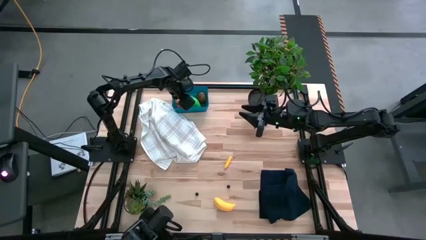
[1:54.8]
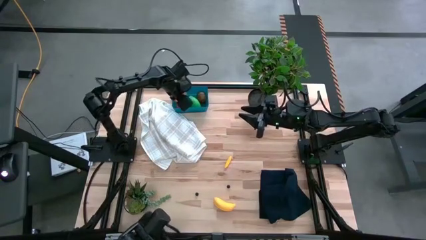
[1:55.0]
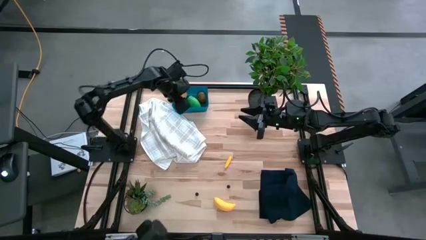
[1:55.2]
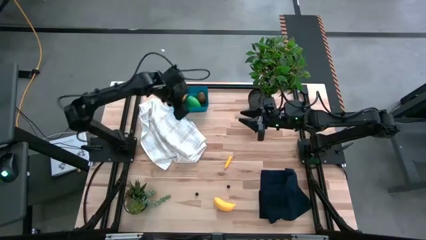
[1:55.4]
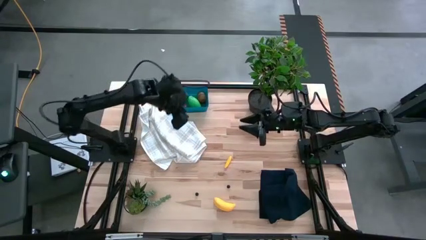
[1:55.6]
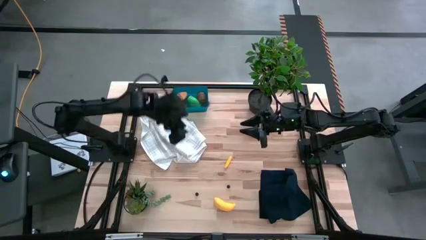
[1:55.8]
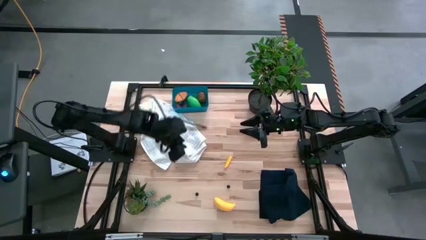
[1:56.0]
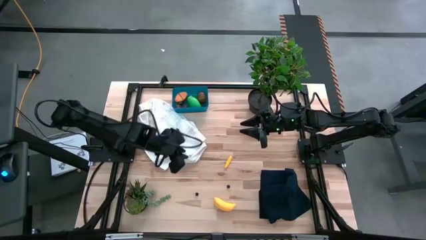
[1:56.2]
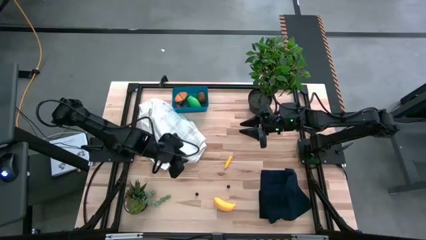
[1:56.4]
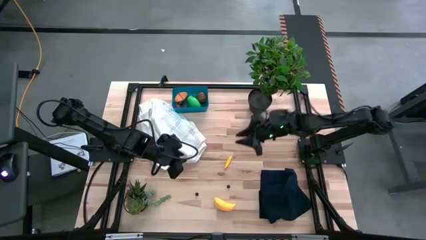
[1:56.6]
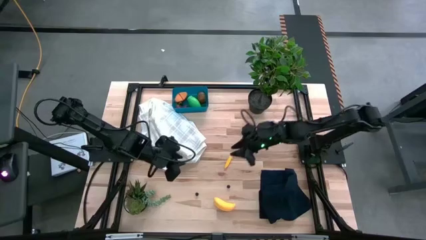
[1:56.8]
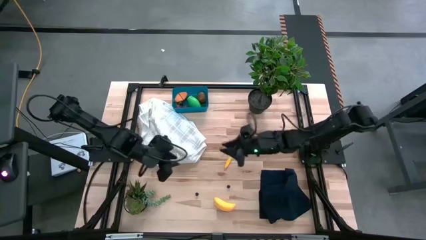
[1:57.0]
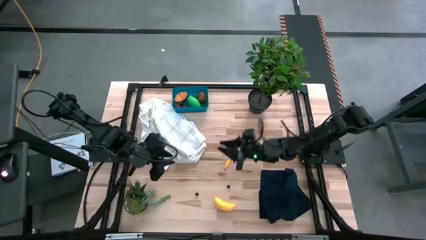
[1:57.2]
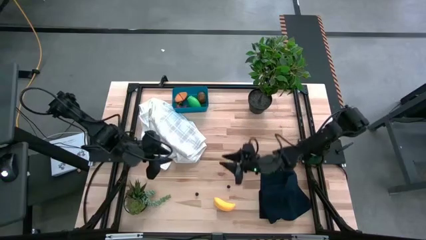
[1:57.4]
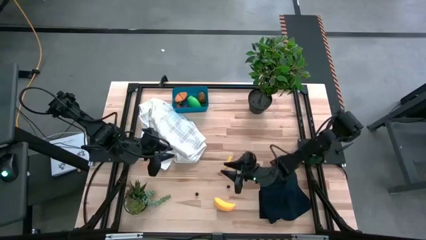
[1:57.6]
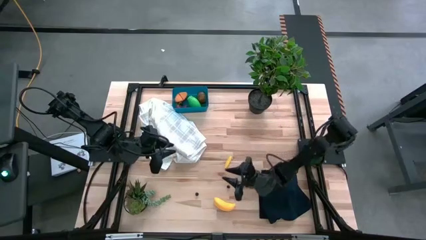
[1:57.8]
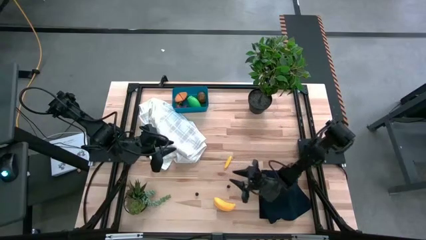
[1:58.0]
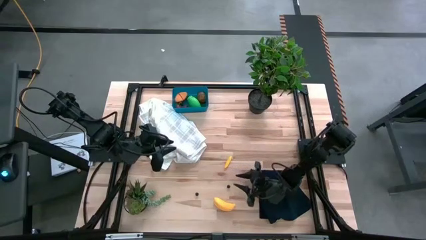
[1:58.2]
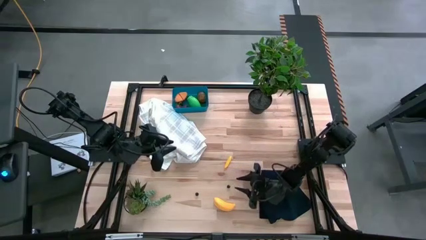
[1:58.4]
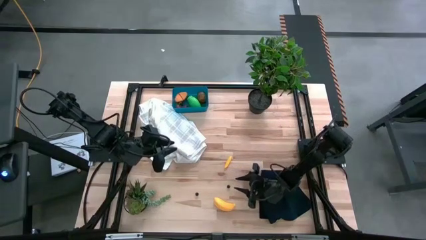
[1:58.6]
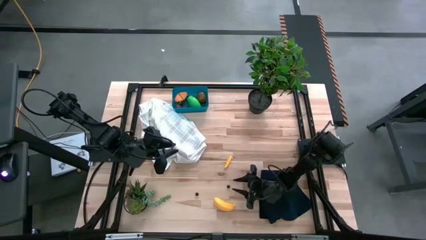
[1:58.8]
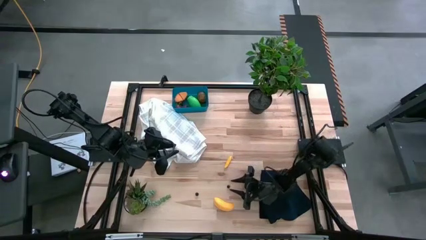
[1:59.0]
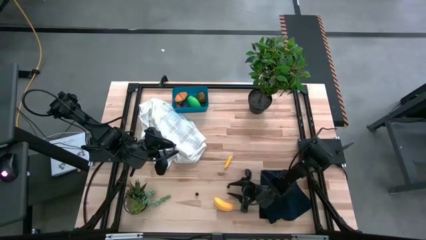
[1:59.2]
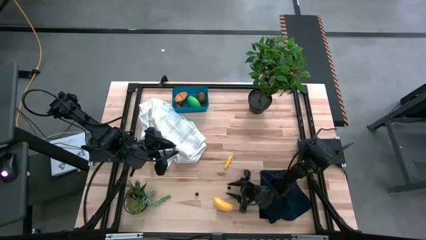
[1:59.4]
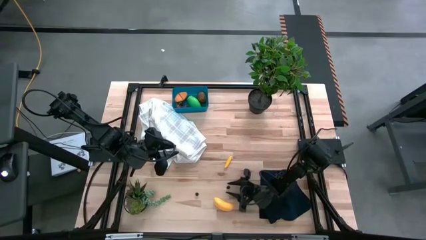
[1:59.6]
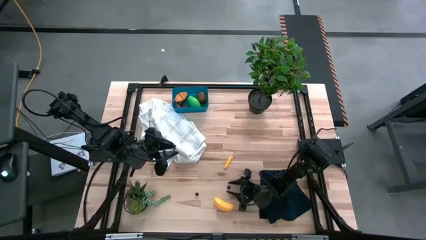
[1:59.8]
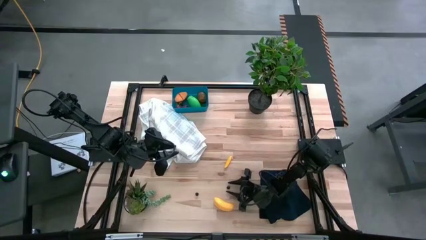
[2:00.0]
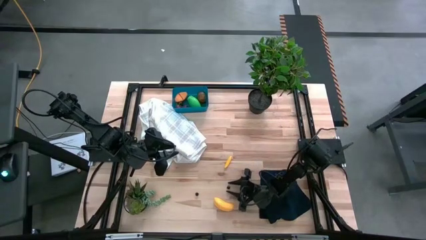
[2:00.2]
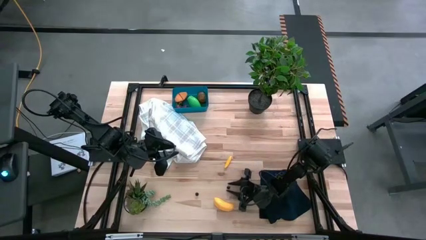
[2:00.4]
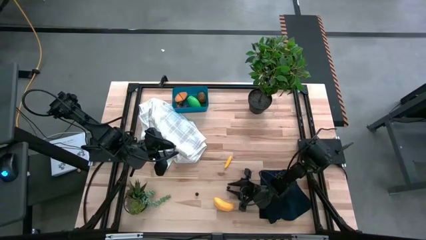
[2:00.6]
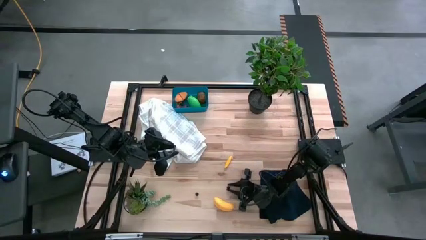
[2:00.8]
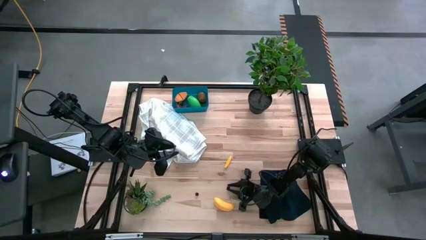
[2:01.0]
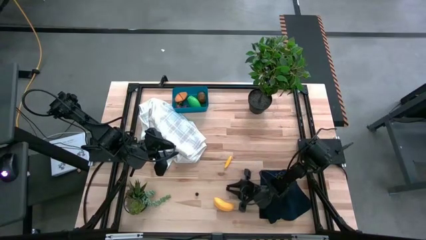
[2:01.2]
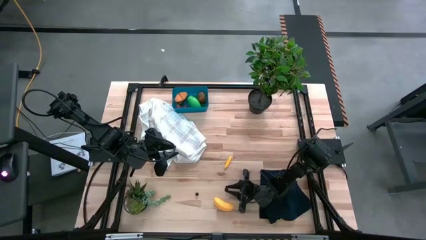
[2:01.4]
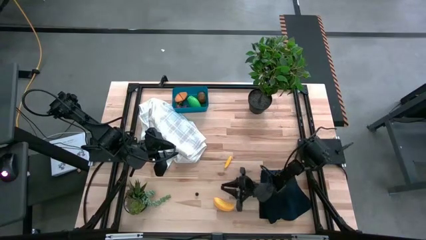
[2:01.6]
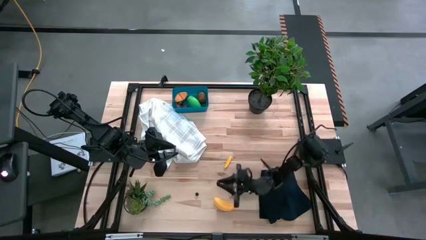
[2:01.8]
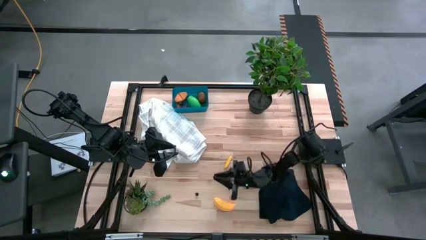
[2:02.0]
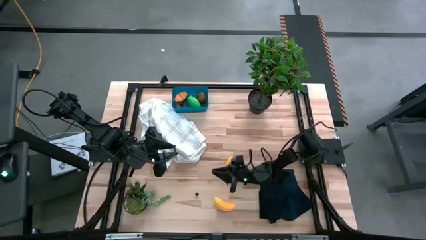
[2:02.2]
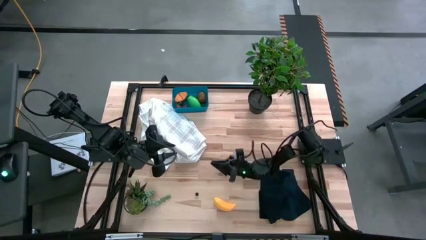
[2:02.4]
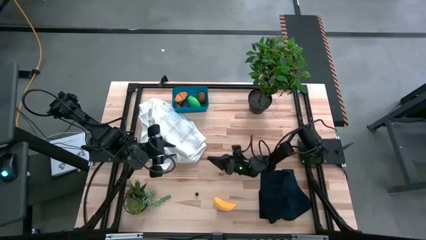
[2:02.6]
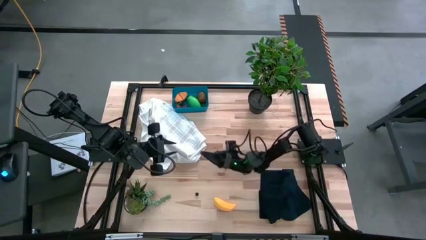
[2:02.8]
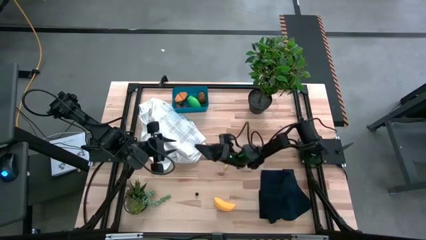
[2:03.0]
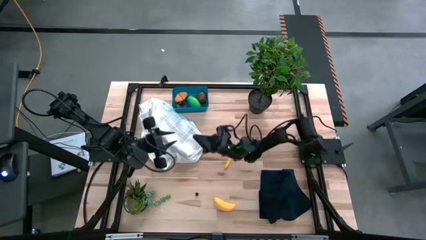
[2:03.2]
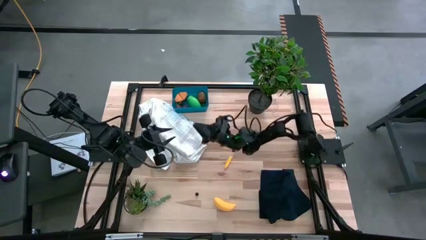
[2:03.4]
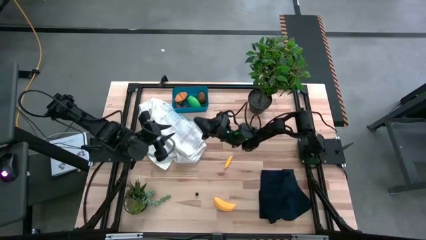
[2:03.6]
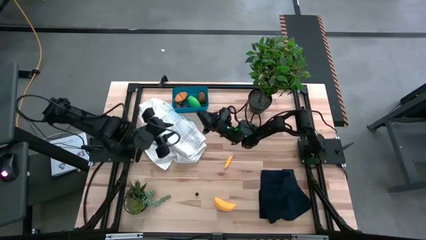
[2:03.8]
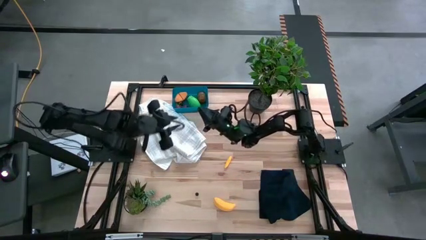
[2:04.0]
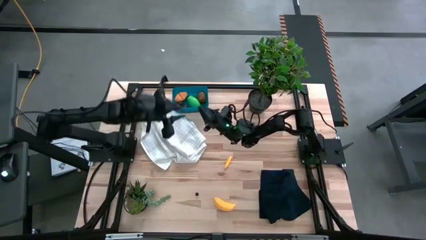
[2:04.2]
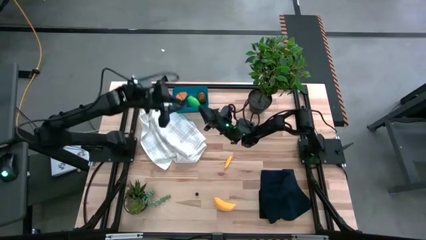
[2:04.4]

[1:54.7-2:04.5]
Task: Pick and placing Produce into tupperware
Put the blueberry into the blue bin

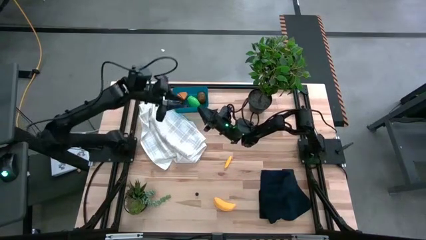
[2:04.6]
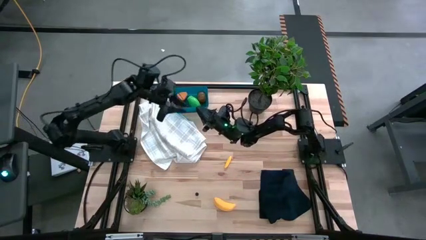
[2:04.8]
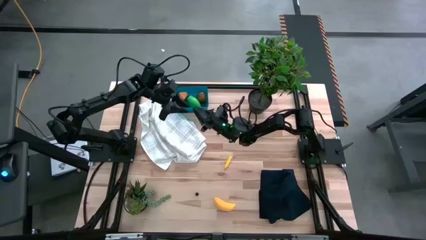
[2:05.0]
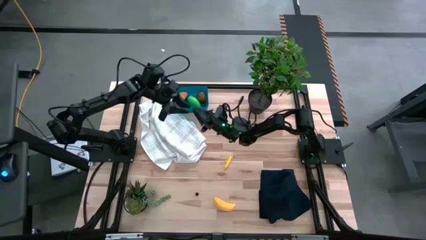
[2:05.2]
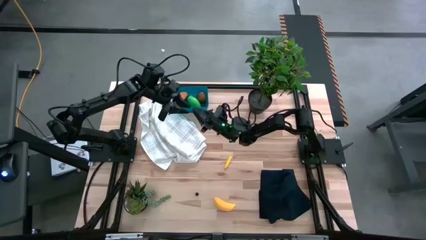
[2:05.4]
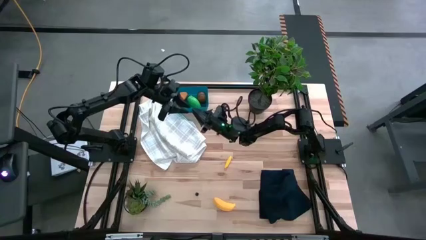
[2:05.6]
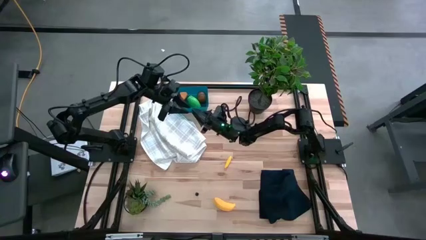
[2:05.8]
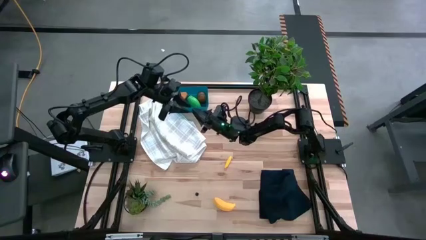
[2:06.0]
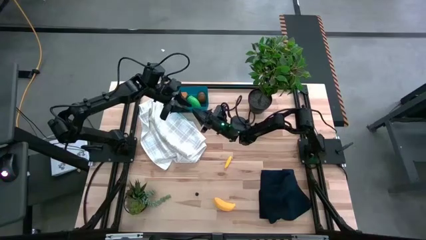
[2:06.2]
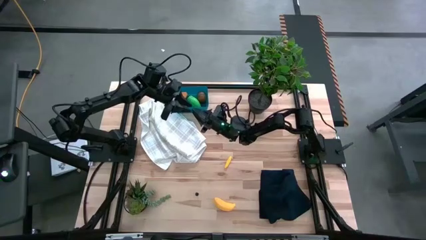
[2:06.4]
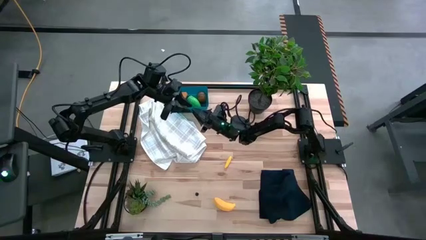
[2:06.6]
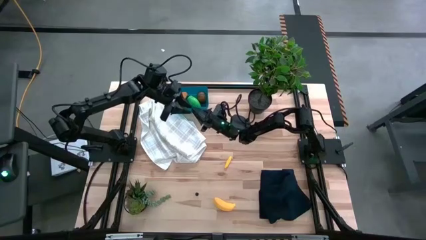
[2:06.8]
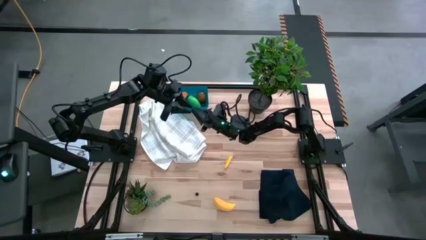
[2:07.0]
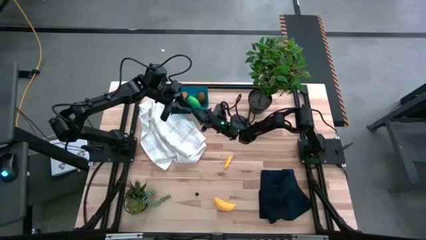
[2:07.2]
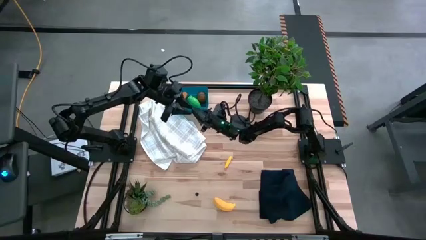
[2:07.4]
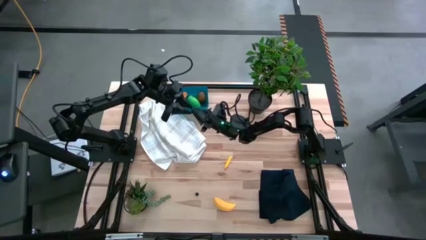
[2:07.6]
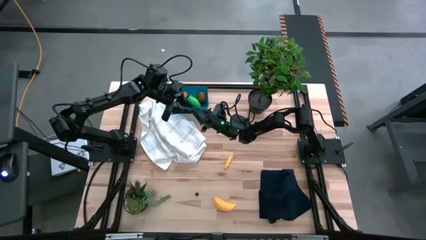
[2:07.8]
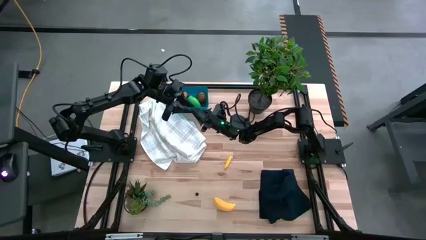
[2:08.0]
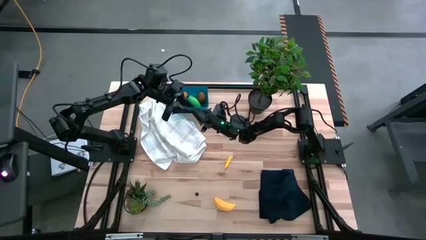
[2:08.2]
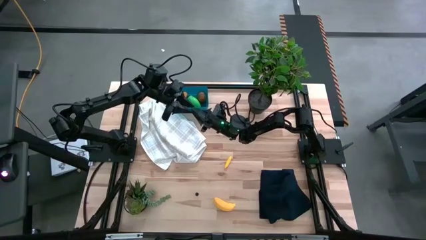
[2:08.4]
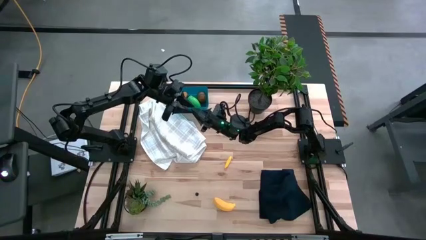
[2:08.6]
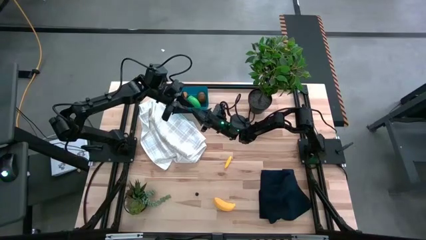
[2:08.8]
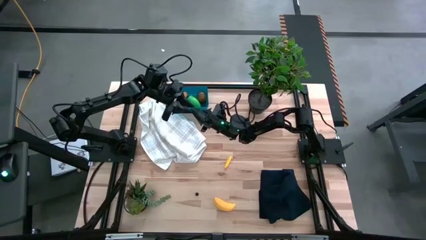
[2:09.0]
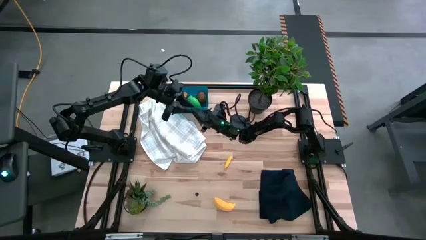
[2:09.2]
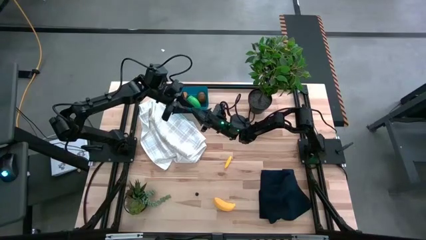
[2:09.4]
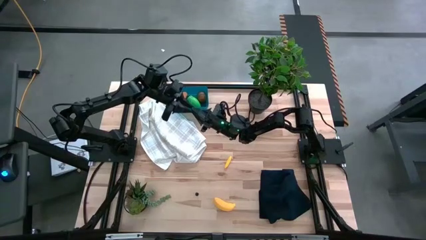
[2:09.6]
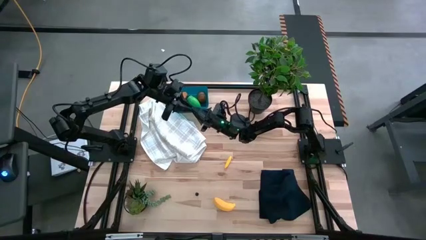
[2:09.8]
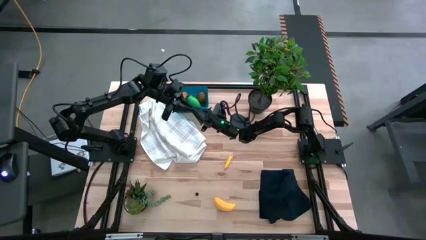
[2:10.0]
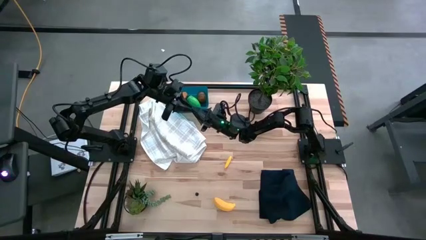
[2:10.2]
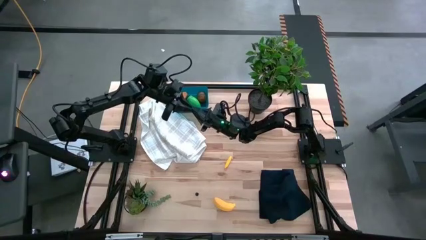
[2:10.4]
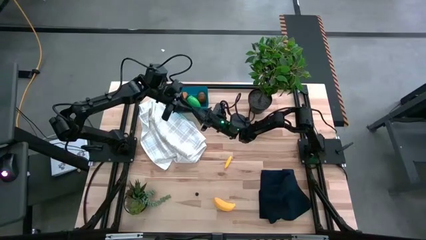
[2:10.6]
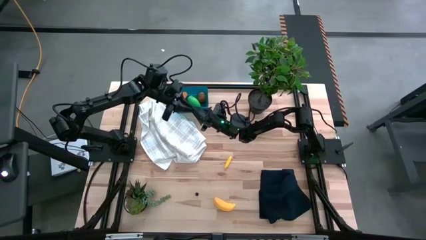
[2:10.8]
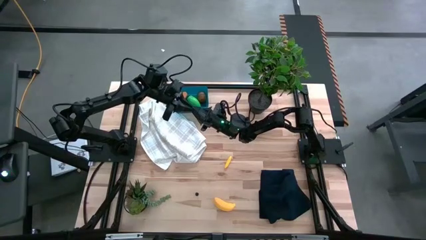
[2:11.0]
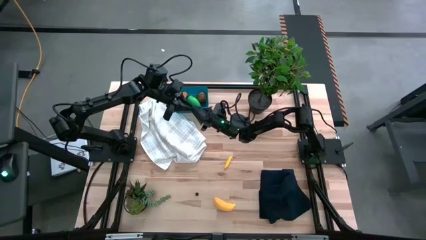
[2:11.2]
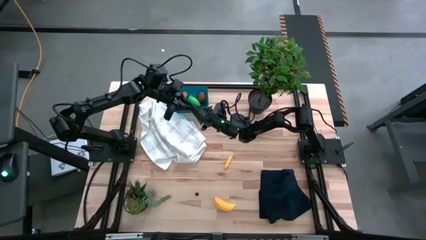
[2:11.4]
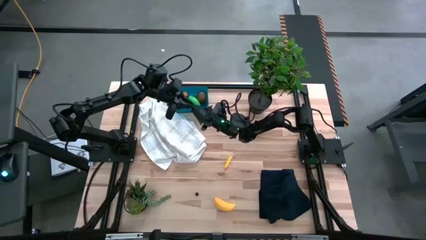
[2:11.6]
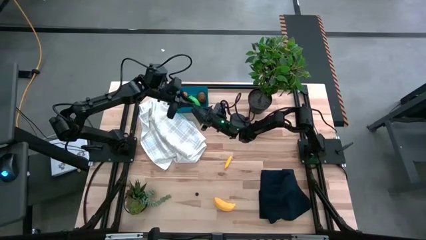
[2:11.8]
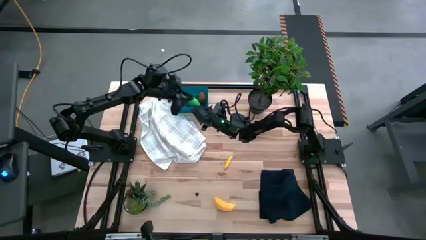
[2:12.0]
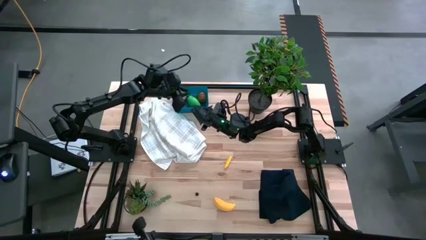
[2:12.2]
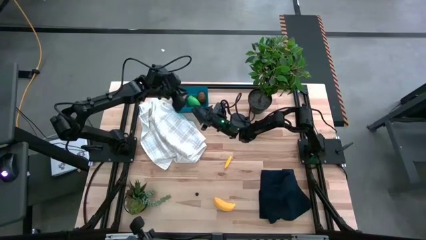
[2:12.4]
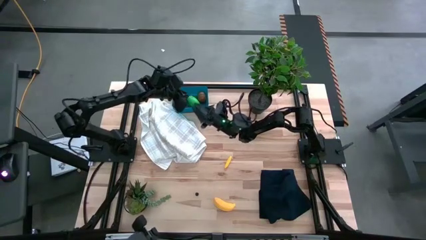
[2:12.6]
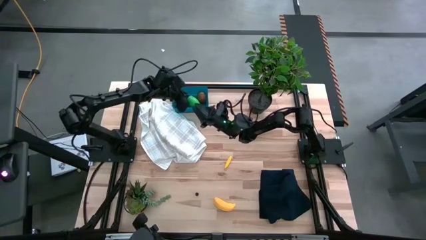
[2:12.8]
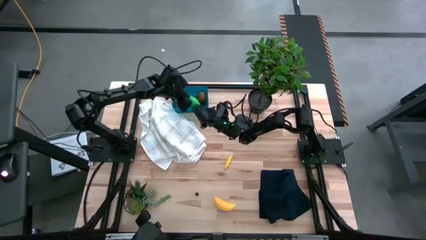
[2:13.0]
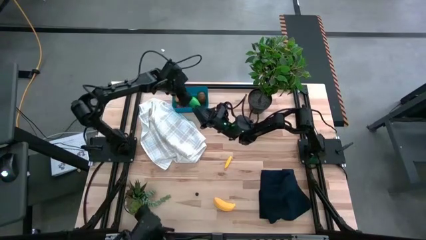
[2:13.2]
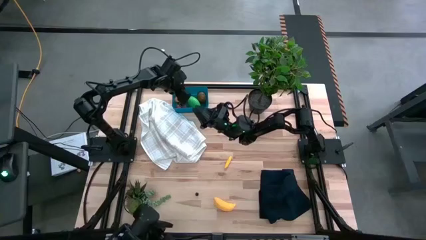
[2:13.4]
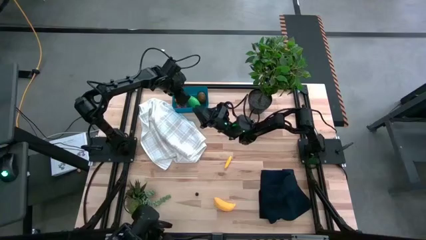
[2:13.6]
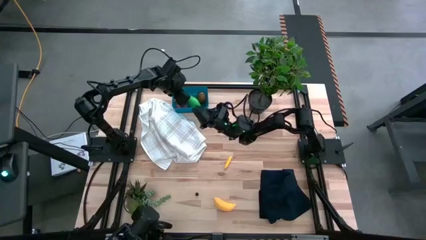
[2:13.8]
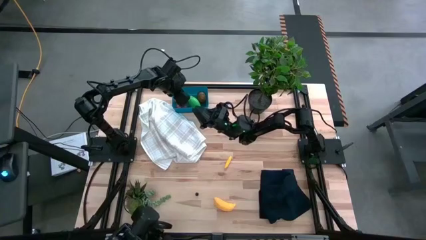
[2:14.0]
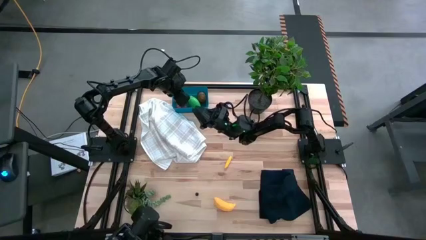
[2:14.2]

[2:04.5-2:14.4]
Put the blueberry into the blue bin
